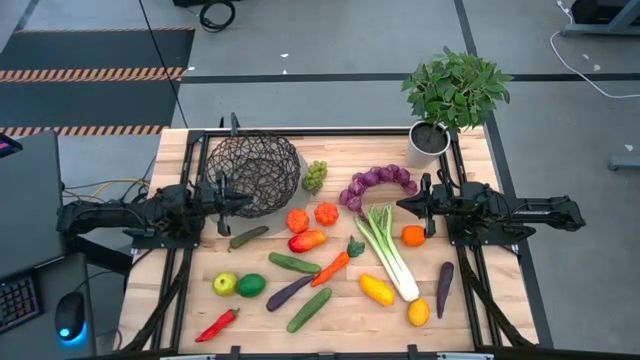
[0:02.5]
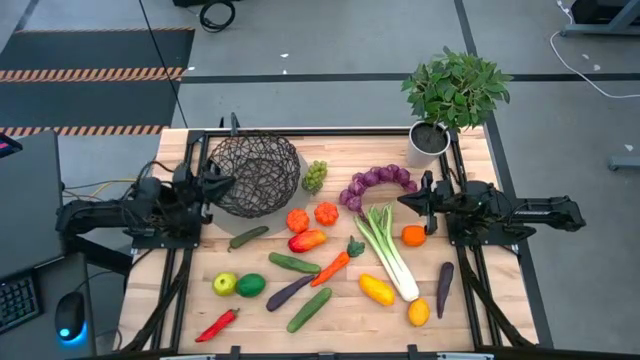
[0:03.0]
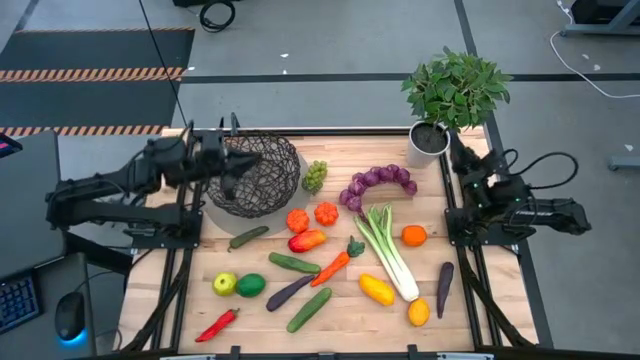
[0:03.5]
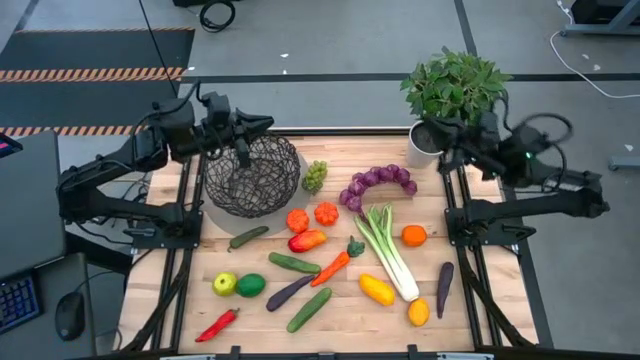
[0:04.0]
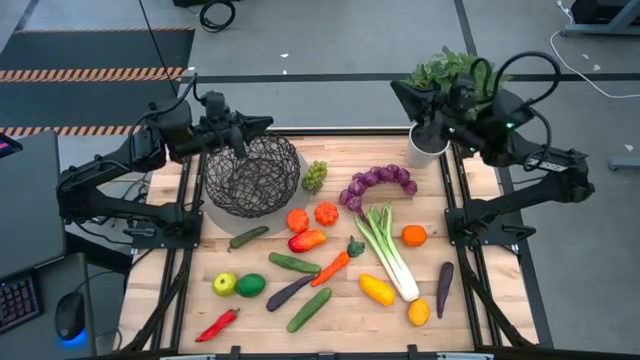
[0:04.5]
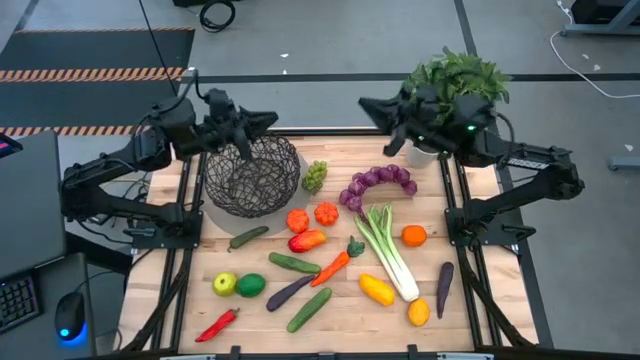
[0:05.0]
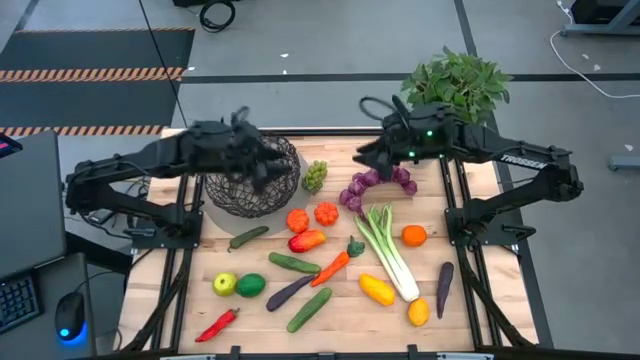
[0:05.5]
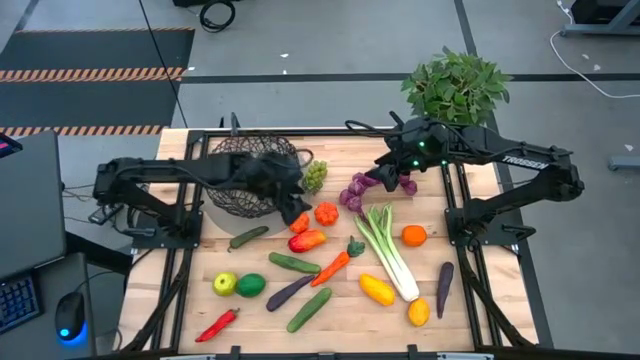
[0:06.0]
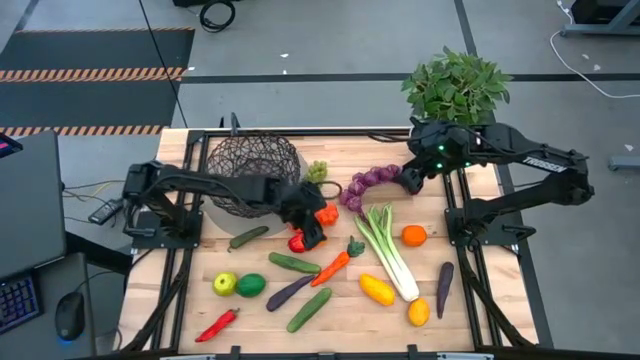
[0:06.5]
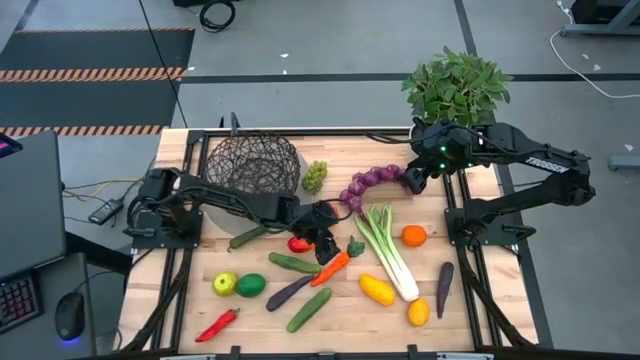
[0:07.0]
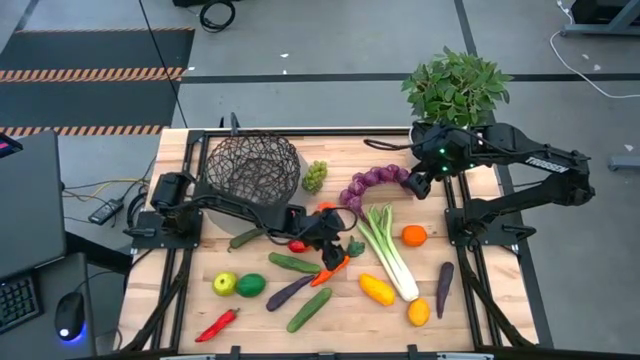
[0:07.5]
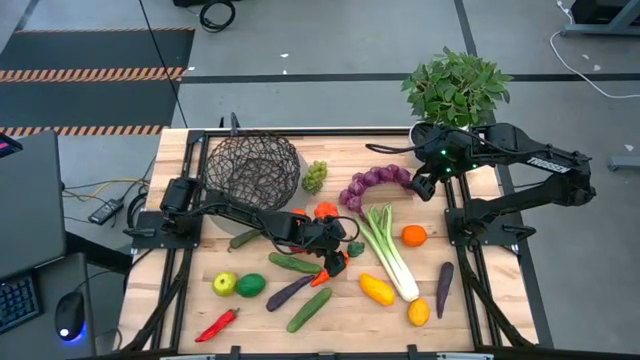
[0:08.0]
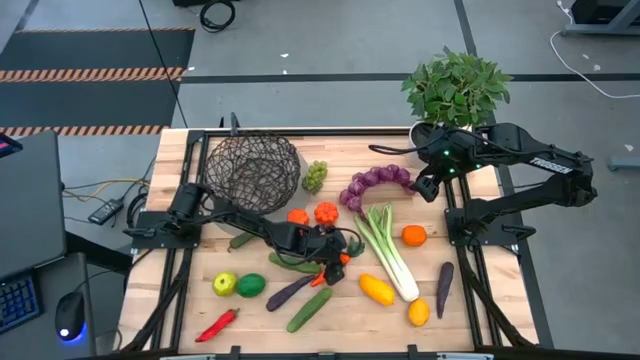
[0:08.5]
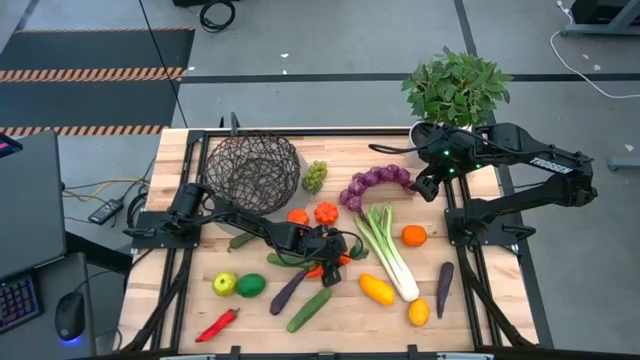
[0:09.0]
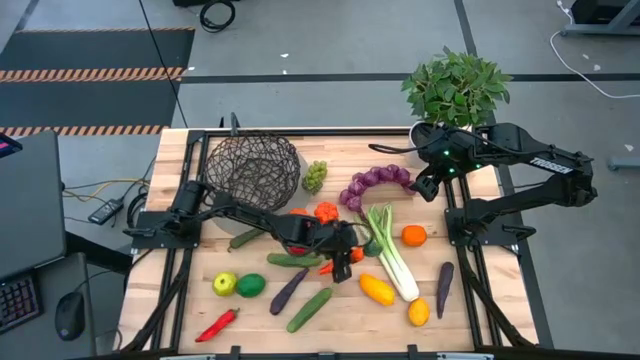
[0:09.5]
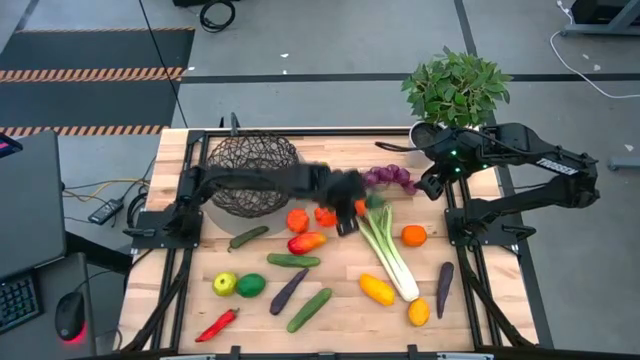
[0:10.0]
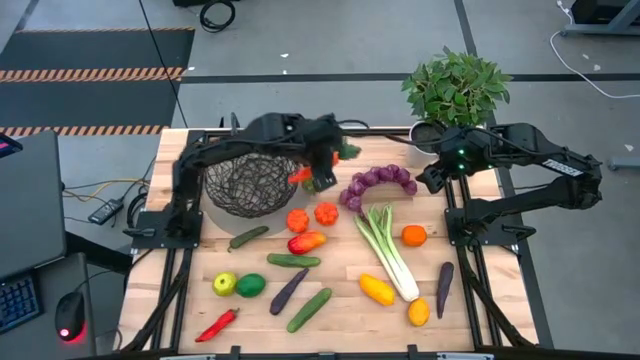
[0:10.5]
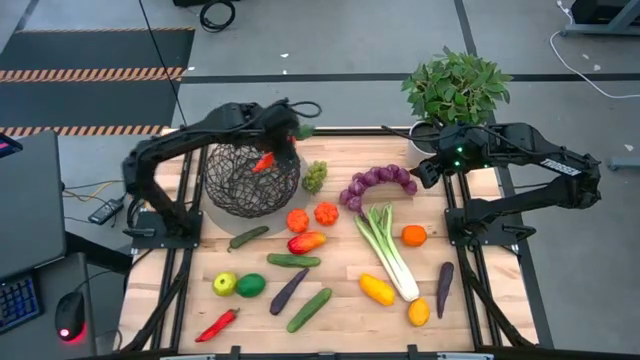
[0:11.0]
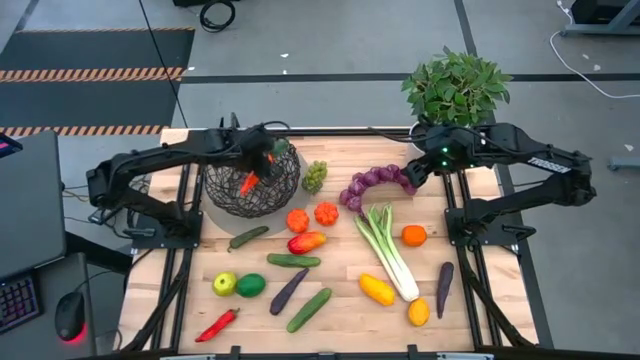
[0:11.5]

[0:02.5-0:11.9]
Task: Build produce basket
Put the orange carrot into the black wire basket

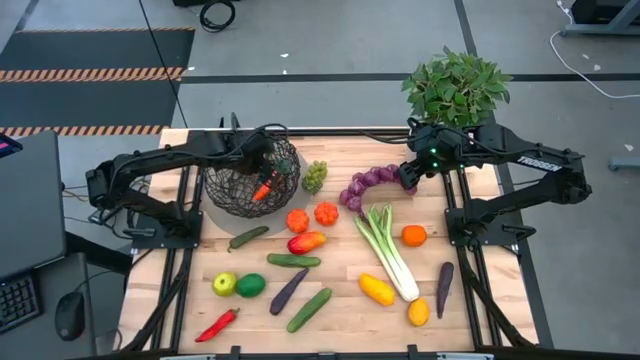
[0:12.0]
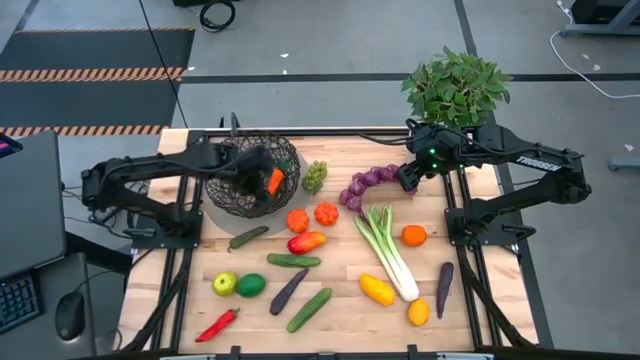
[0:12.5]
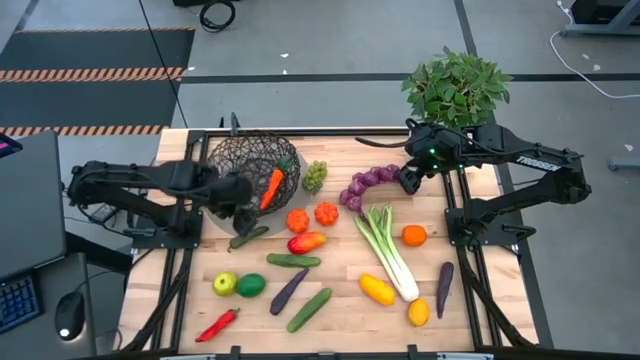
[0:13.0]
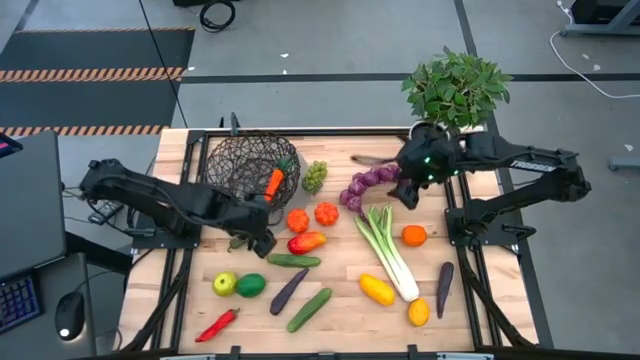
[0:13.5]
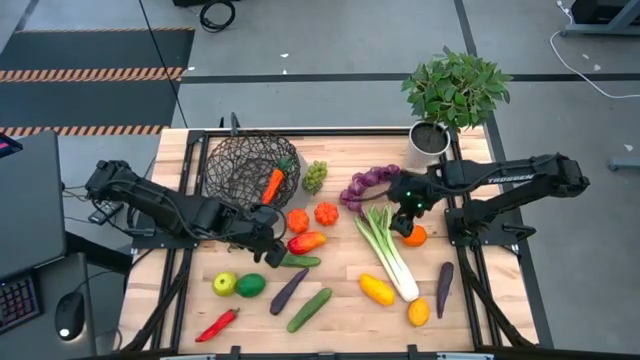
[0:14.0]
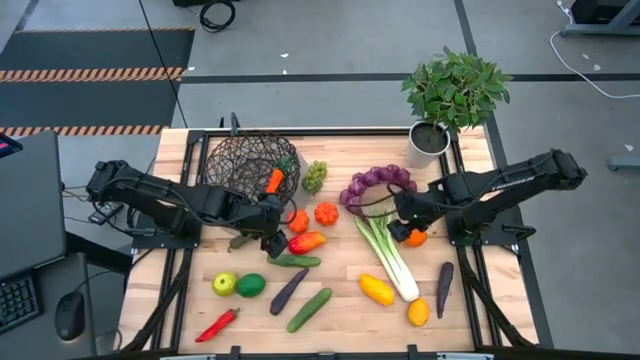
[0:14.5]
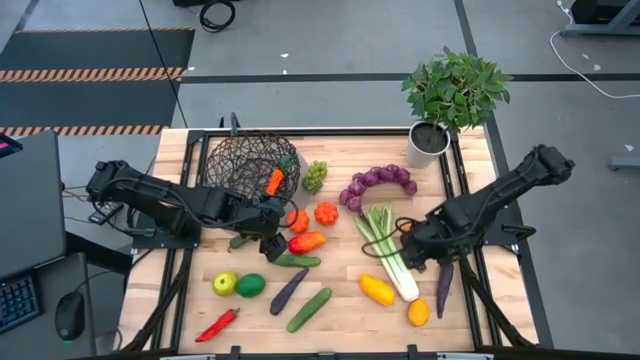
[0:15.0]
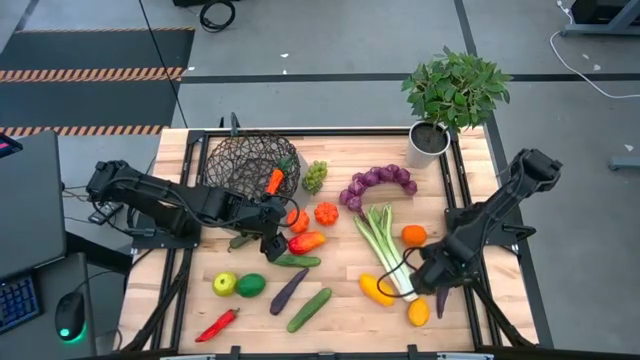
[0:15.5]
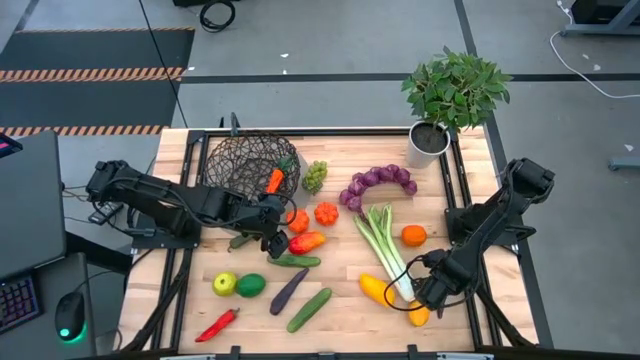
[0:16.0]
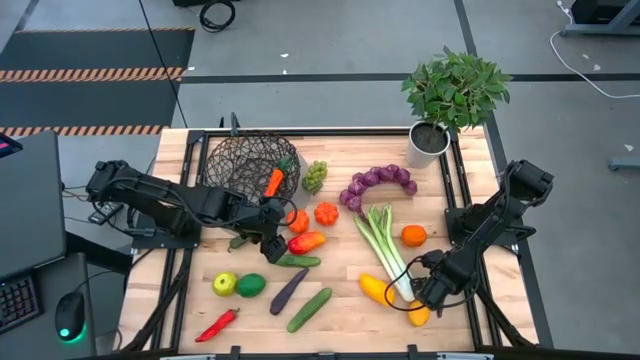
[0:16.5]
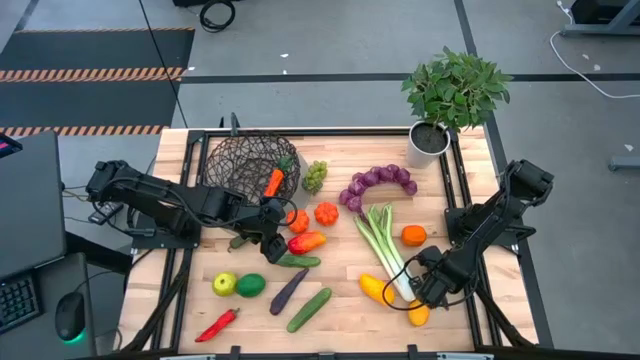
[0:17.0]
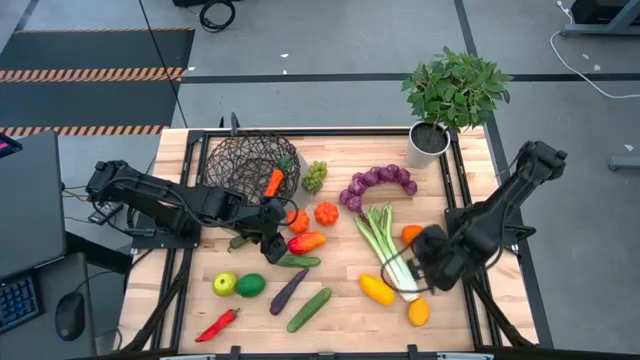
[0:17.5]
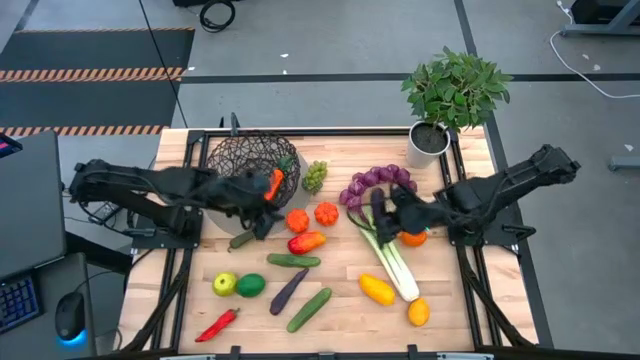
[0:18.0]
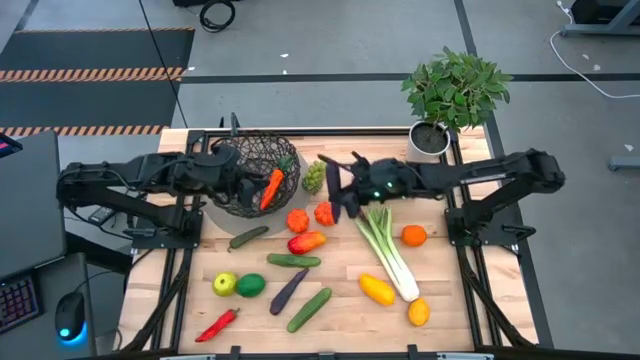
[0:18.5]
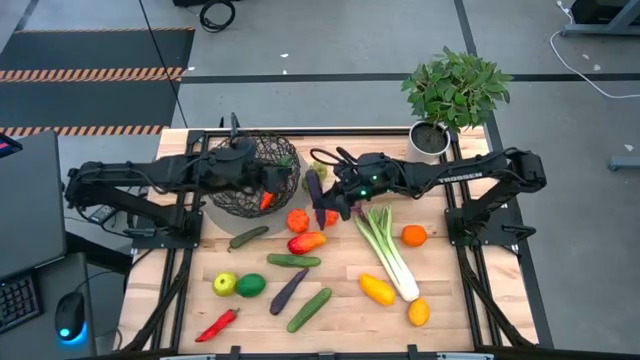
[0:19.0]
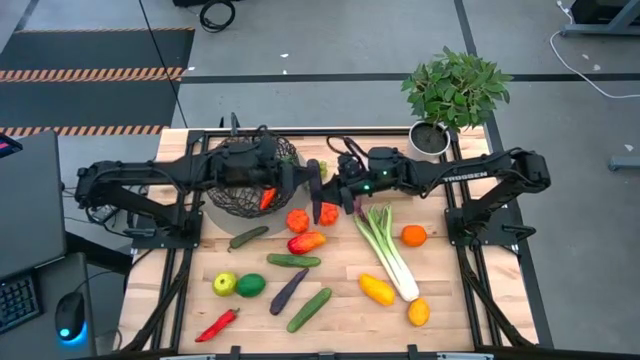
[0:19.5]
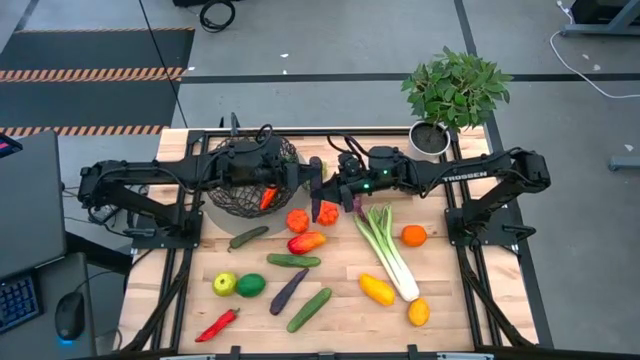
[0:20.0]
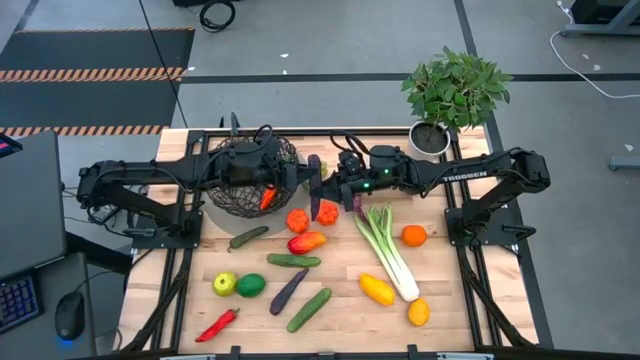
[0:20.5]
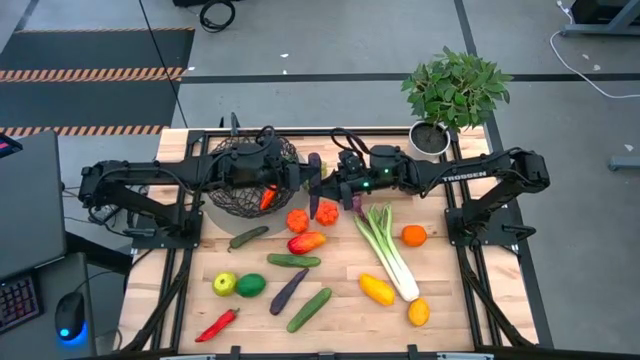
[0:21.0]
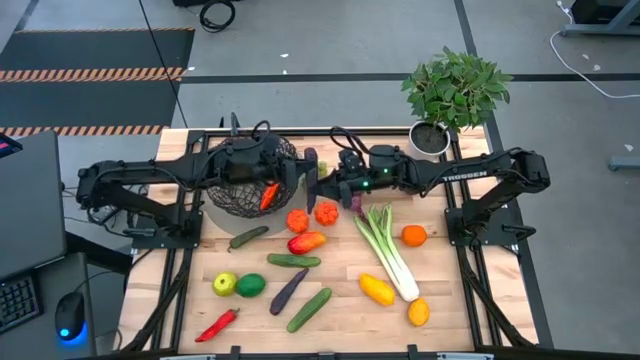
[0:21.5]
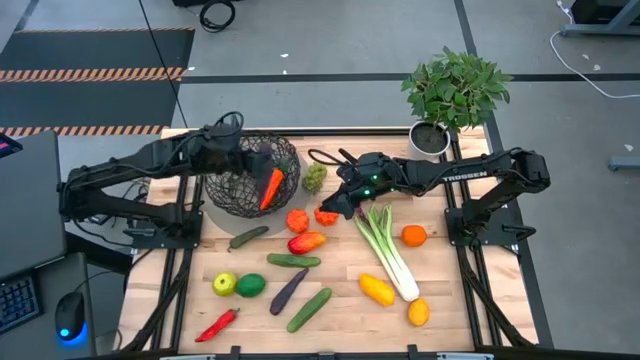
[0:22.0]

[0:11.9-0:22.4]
Put the right purple eggplant into the black wire basket

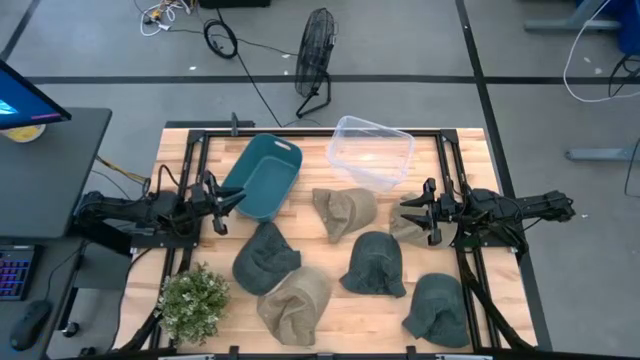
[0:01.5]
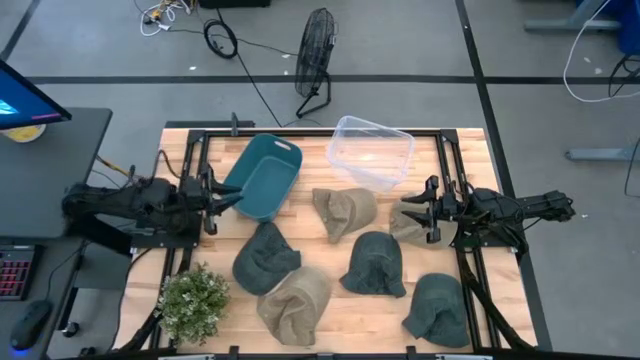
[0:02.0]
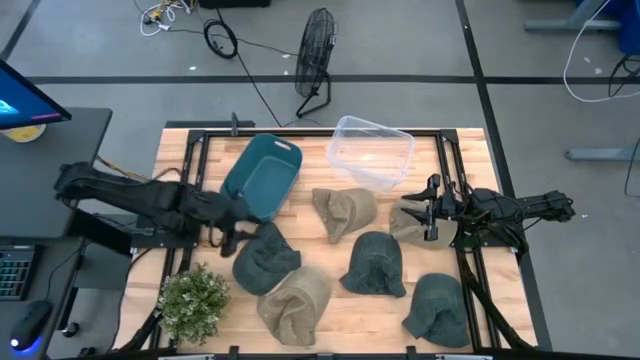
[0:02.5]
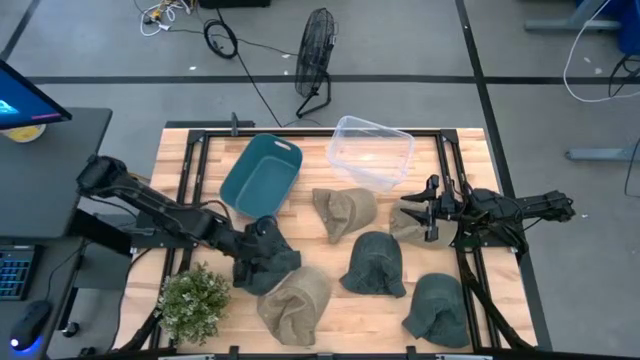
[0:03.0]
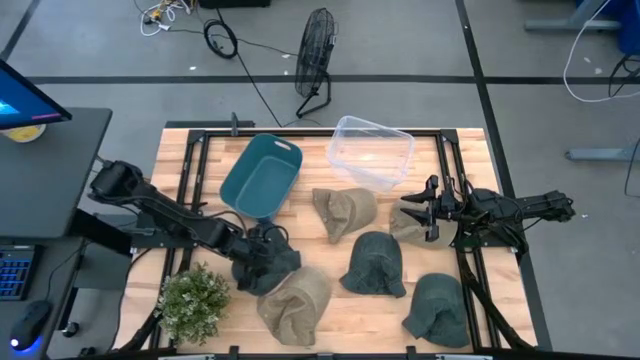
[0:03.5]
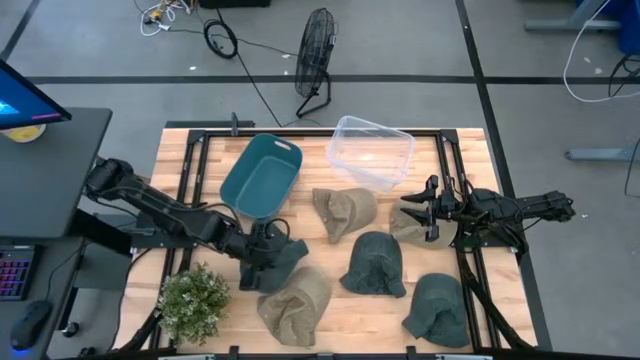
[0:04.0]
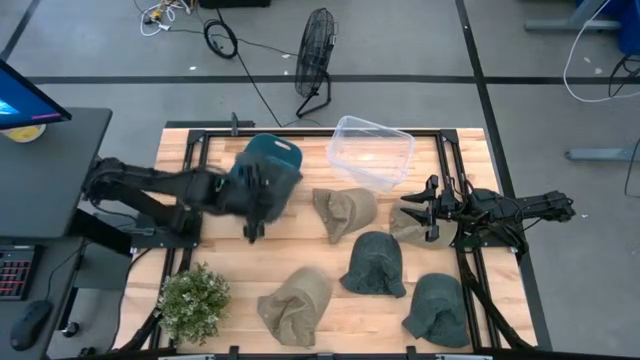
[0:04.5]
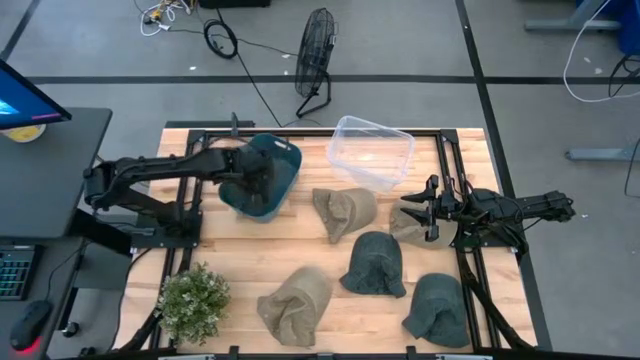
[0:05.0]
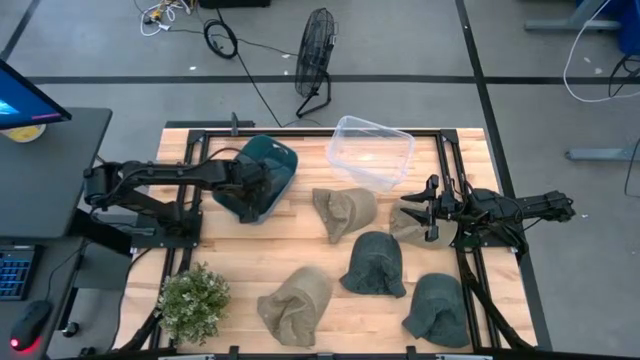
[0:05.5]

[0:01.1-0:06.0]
Task: Pick & Place hat
Put the top left blue cap into the blue bin
